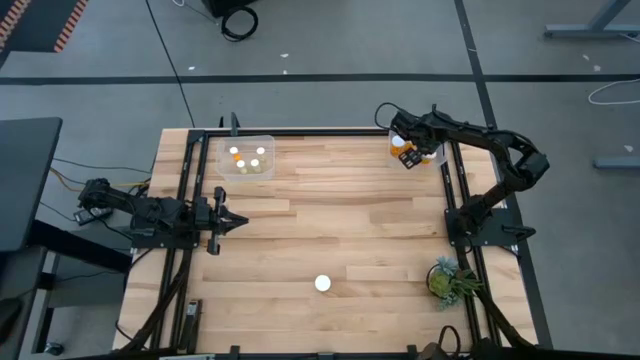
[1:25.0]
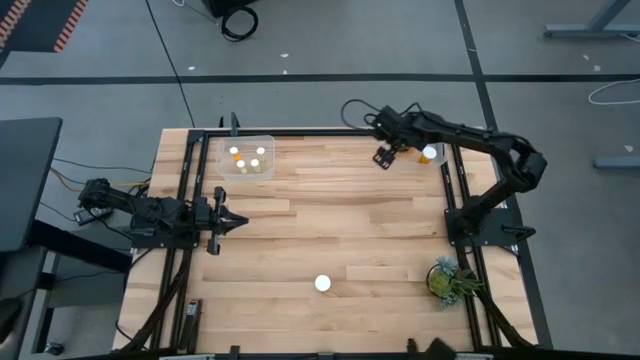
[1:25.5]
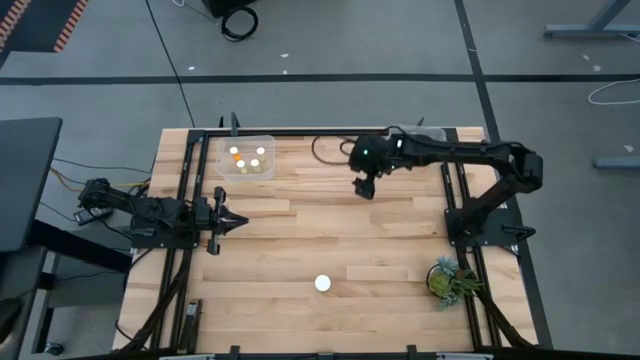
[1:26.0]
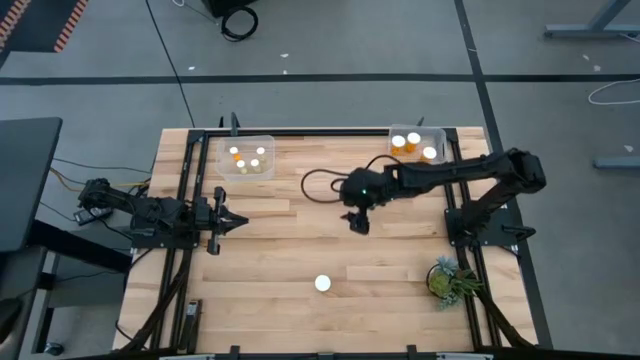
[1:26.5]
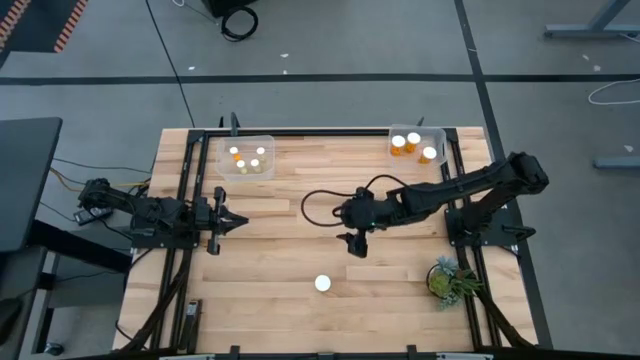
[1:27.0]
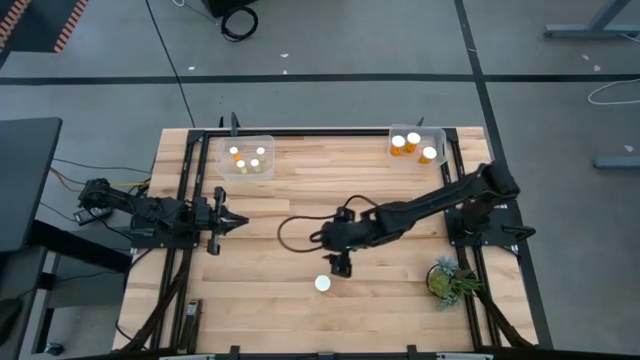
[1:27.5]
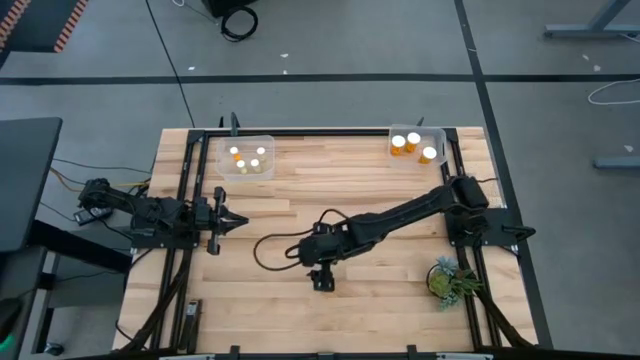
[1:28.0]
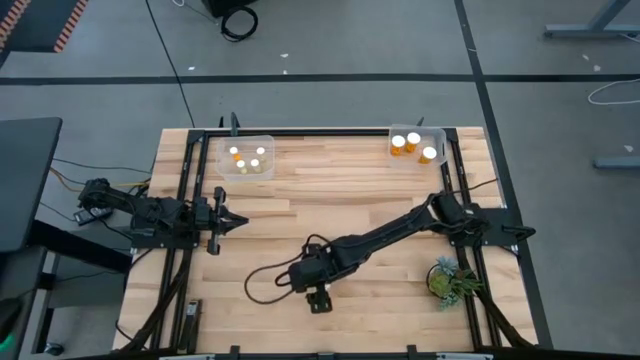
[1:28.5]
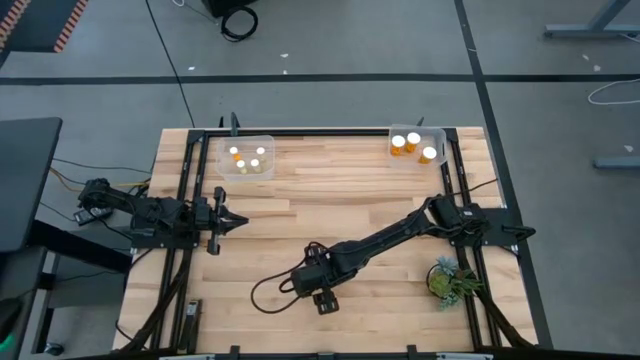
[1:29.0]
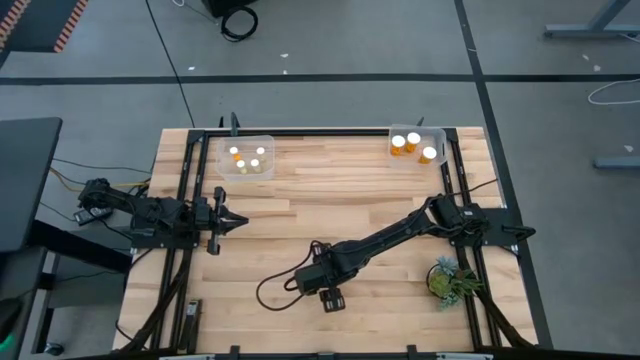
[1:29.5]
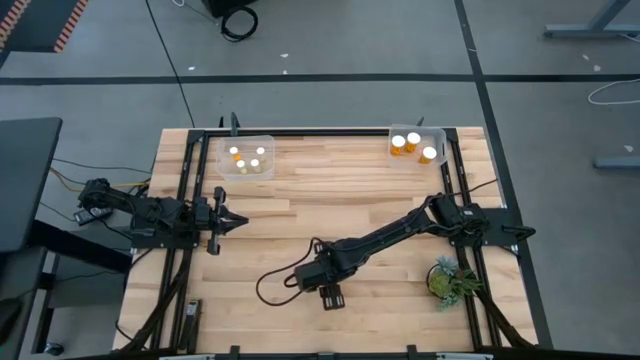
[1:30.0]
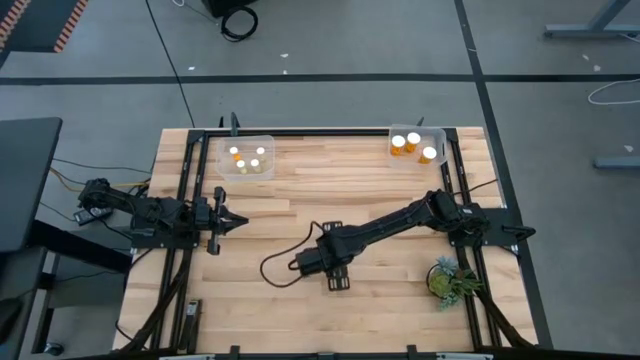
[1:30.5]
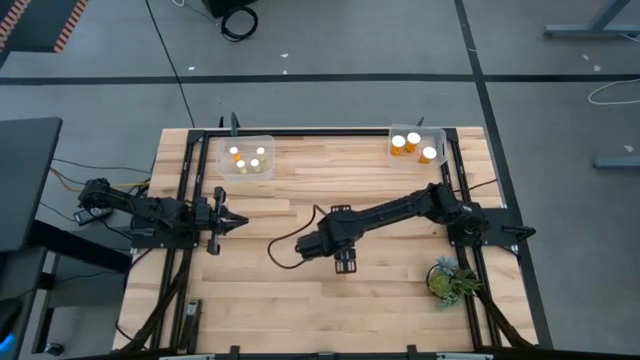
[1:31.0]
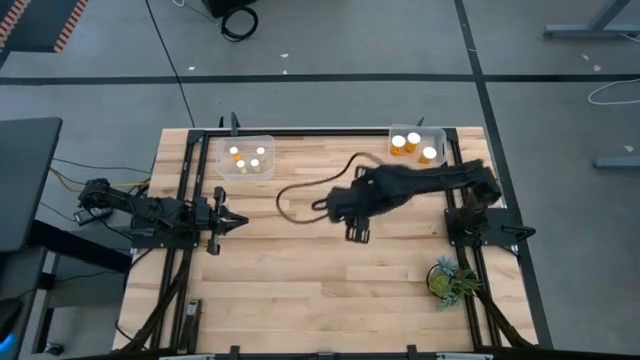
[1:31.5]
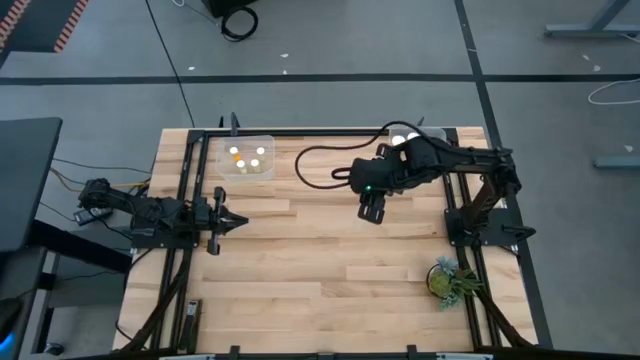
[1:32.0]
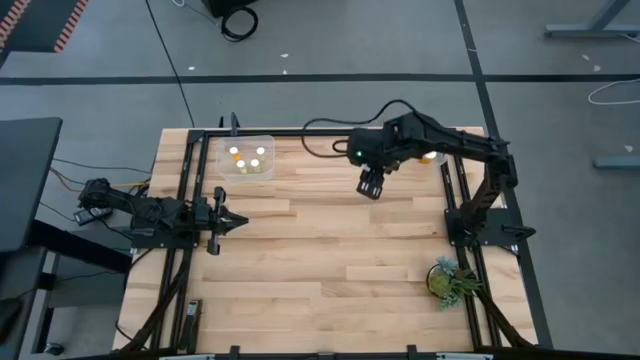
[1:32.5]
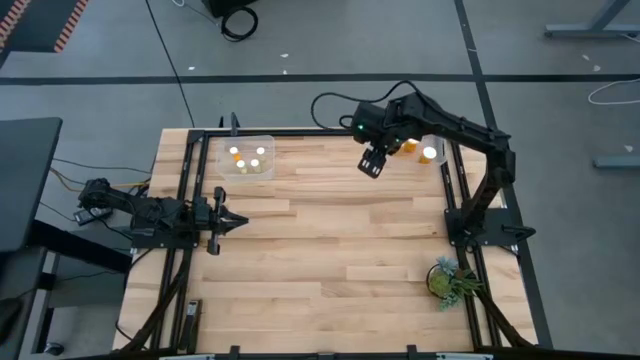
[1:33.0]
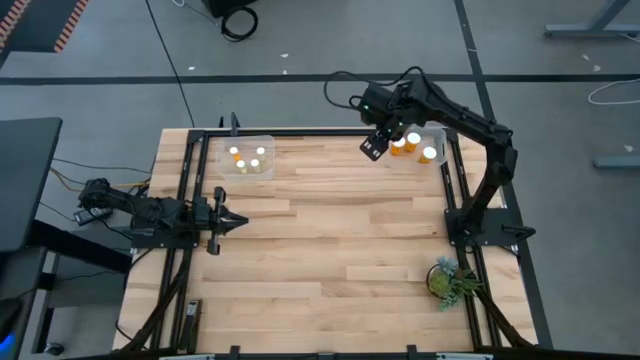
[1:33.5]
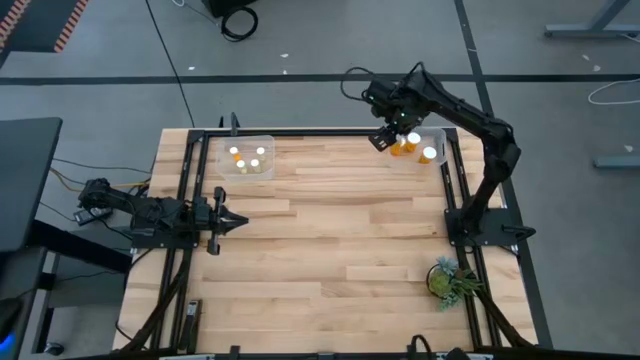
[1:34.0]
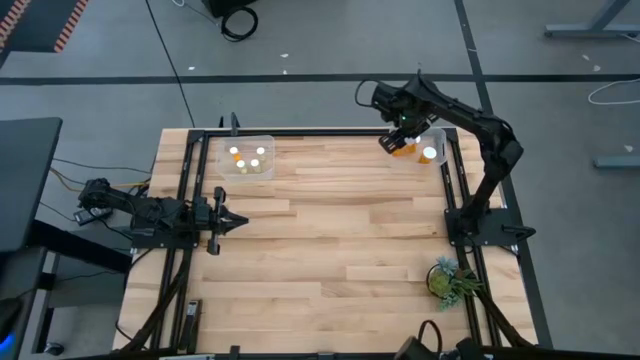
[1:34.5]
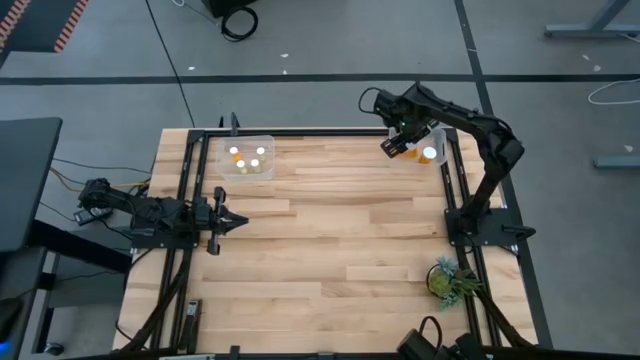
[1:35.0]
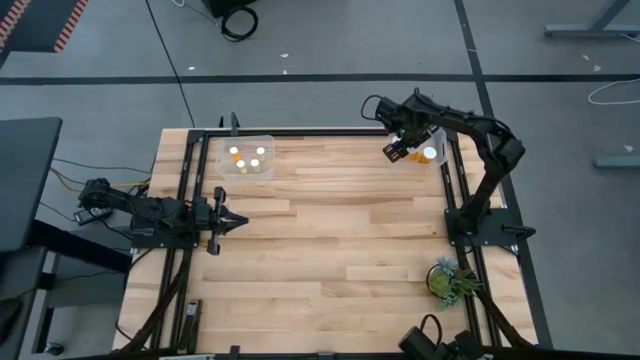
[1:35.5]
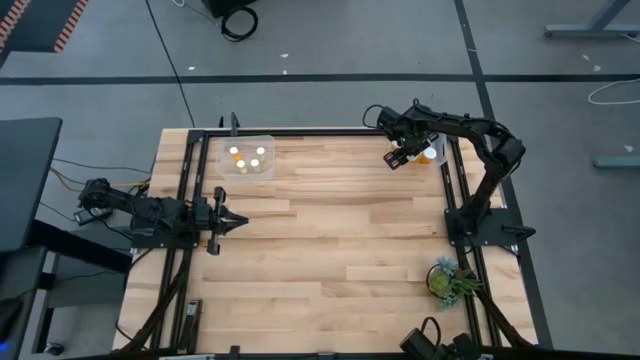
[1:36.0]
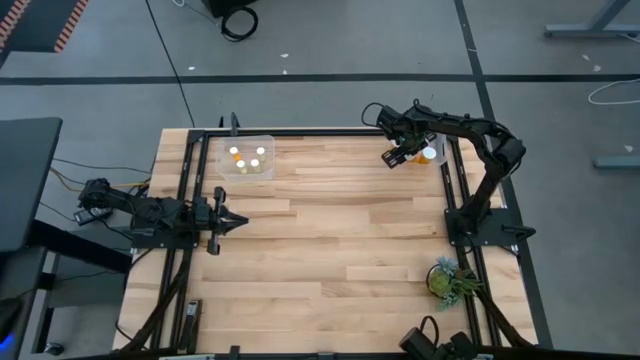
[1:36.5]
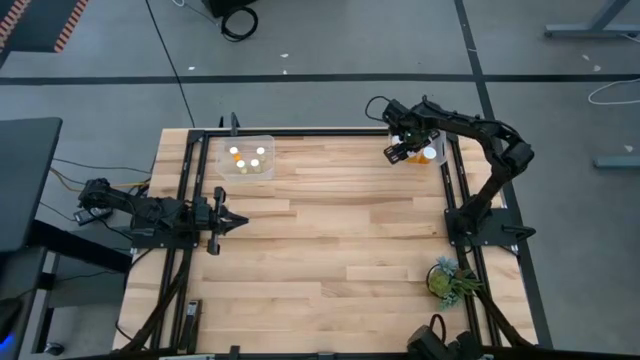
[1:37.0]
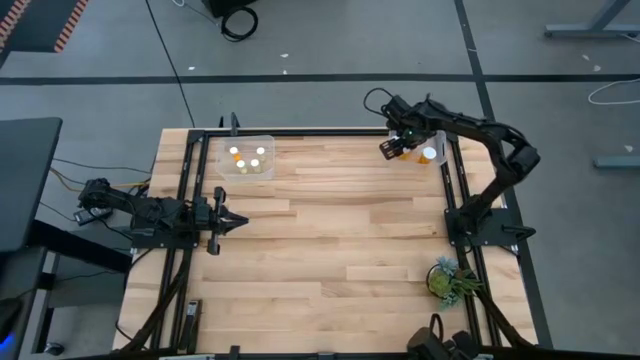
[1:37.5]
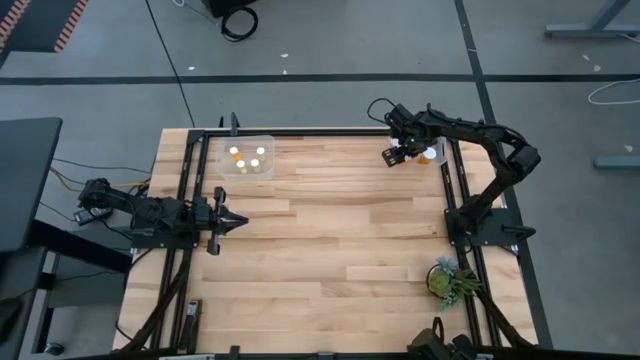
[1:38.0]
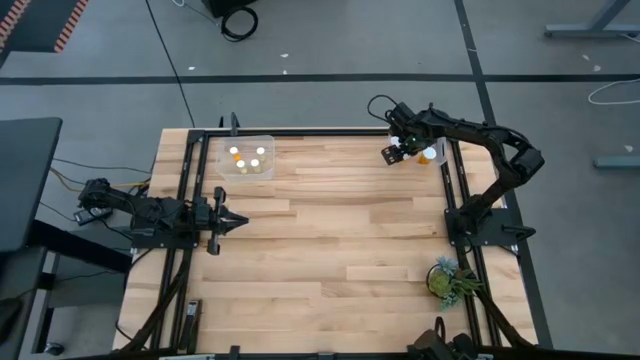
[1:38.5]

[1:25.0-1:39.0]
Task: Pick and place medicine bottles into bin by pill shape (circle, oval)
Put the orange capsule bottle into the right transparent bin

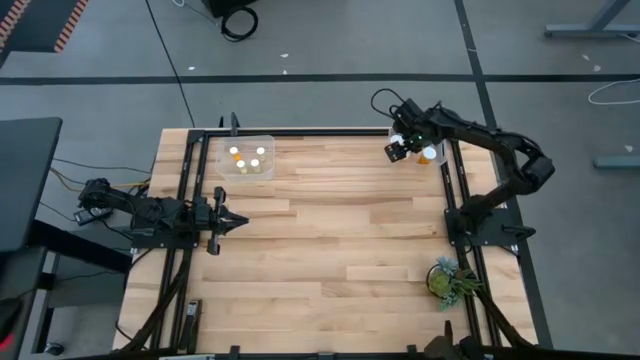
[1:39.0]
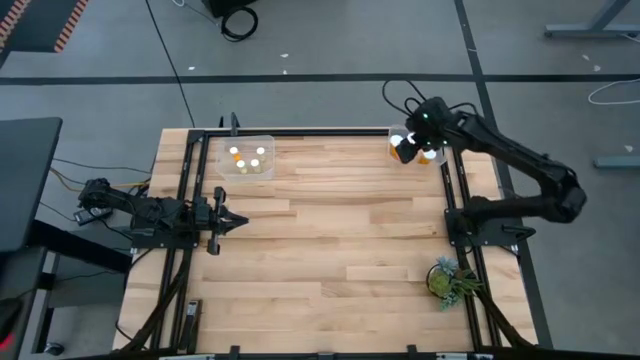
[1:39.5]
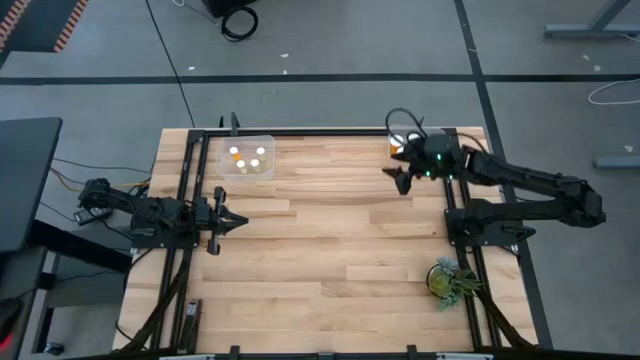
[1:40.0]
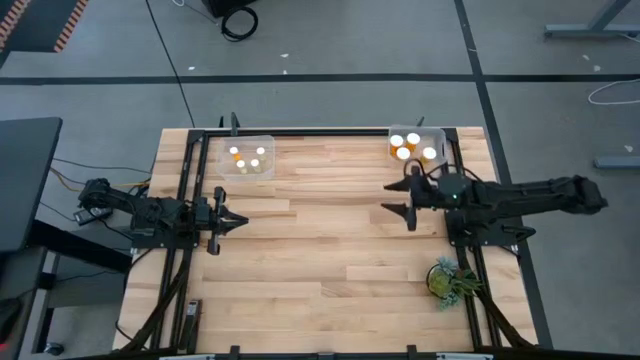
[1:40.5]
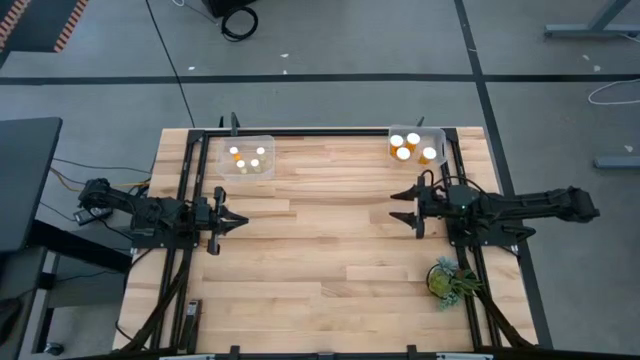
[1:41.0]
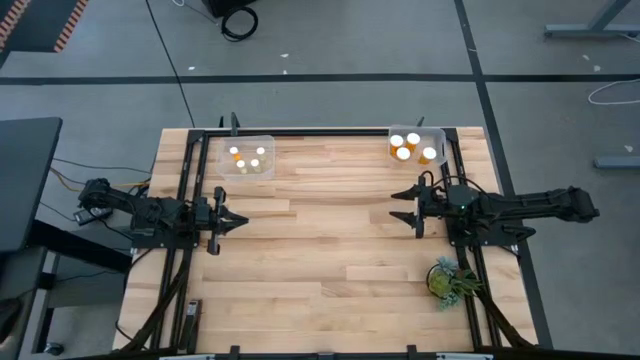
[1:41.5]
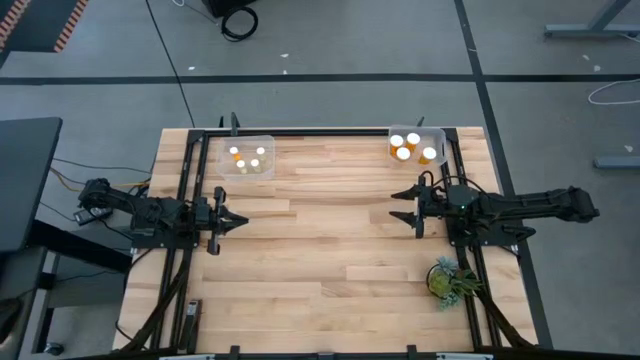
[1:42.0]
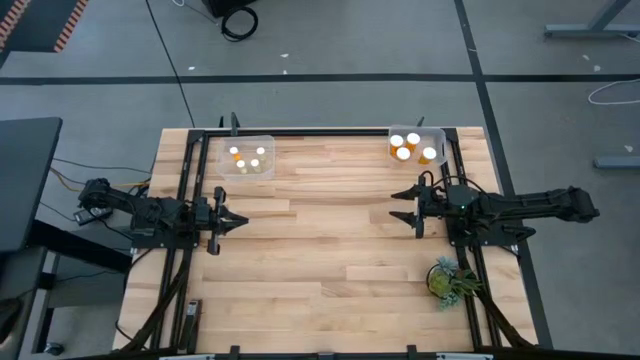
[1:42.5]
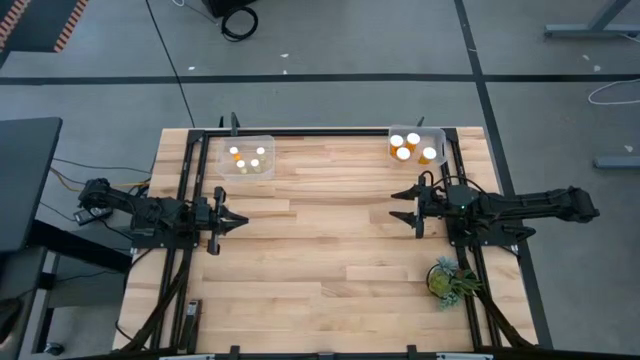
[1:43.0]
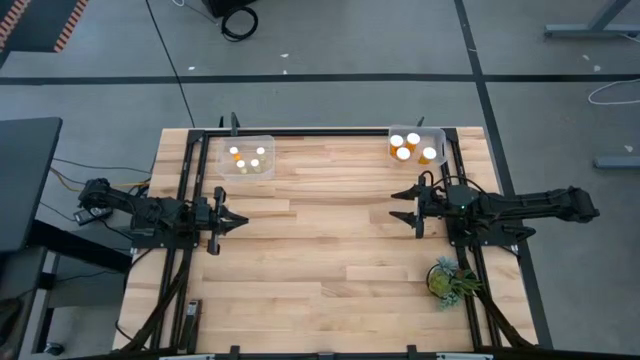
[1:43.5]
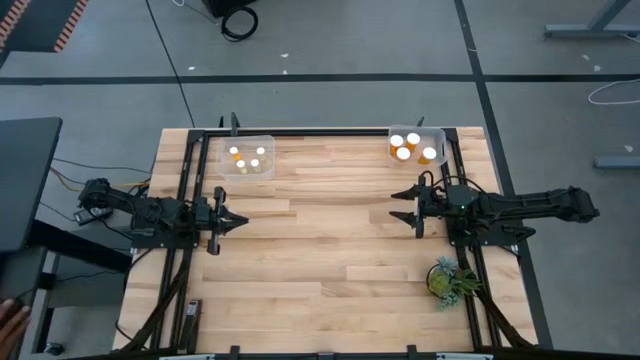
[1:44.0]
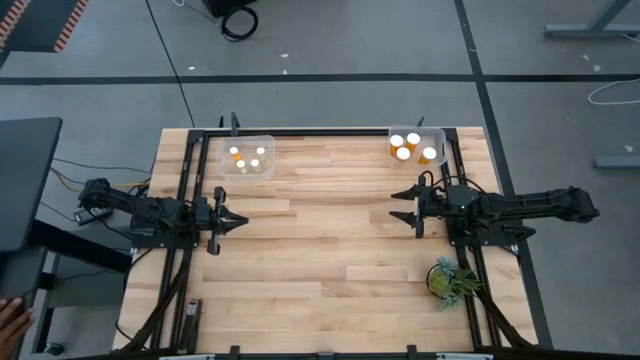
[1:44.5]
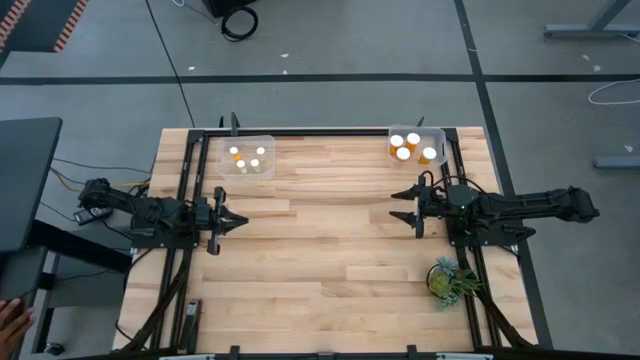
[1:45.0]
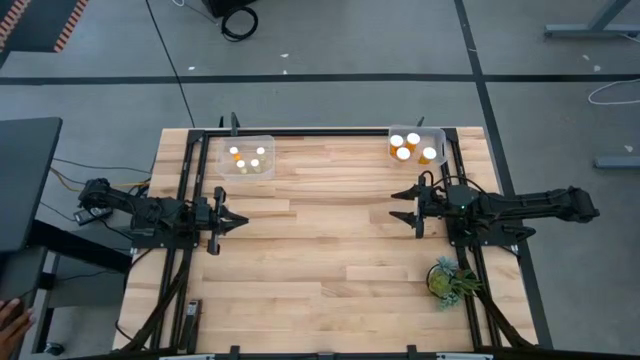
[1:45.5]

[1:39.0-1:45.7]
Return to Home Position
